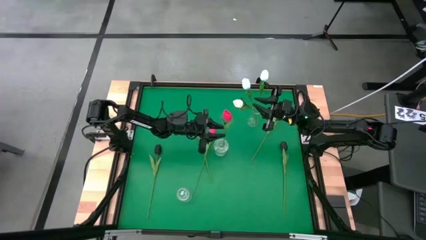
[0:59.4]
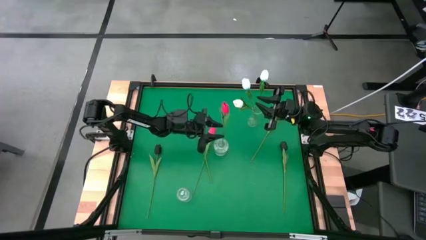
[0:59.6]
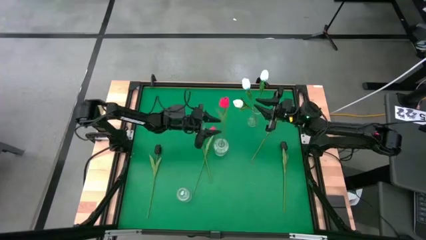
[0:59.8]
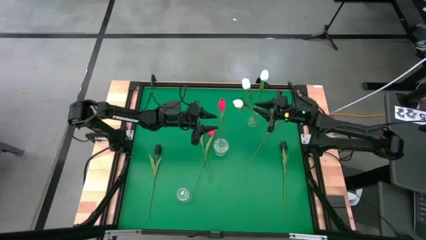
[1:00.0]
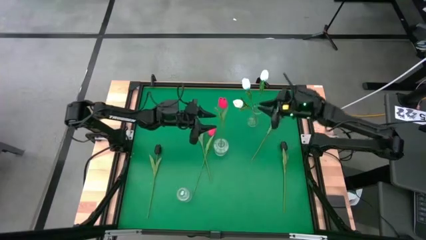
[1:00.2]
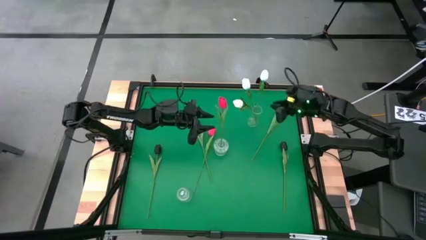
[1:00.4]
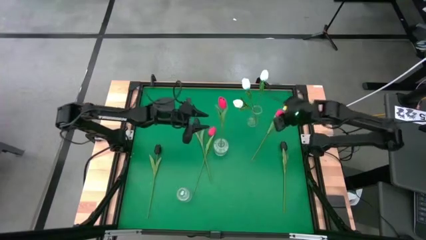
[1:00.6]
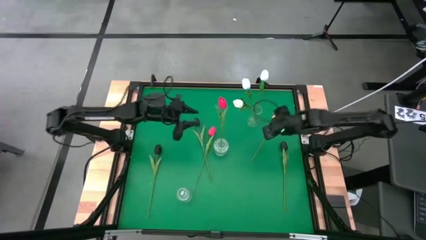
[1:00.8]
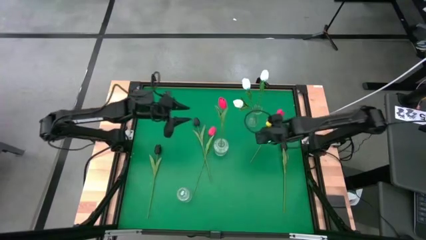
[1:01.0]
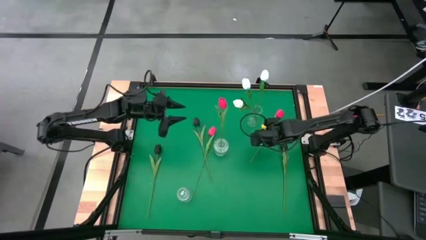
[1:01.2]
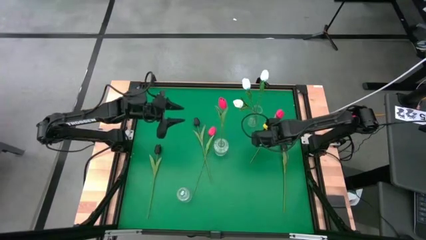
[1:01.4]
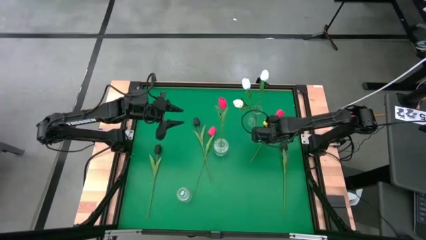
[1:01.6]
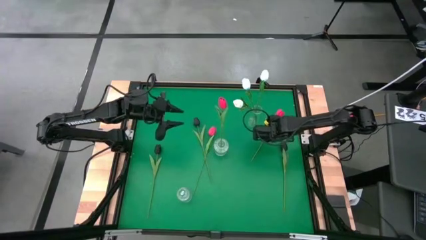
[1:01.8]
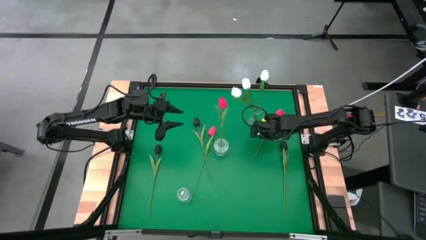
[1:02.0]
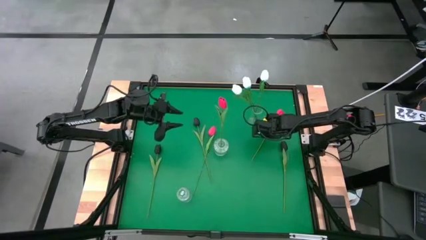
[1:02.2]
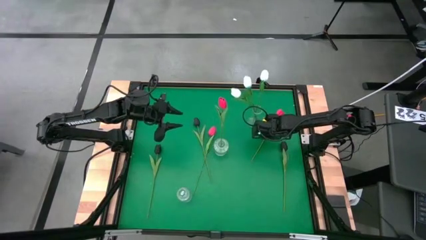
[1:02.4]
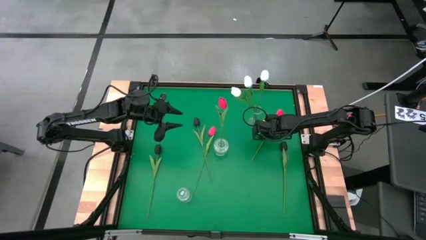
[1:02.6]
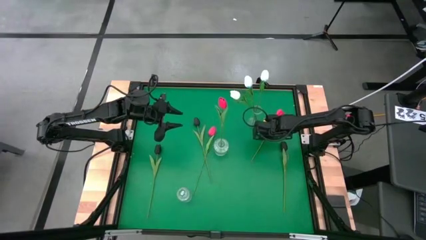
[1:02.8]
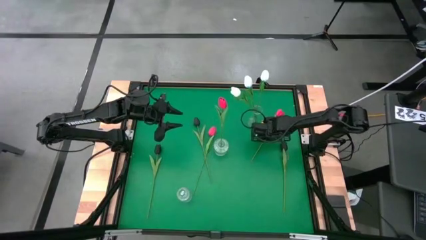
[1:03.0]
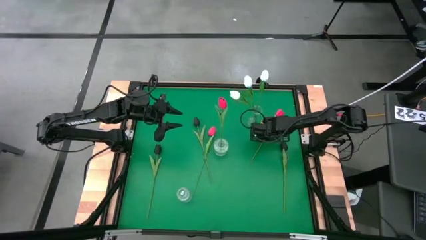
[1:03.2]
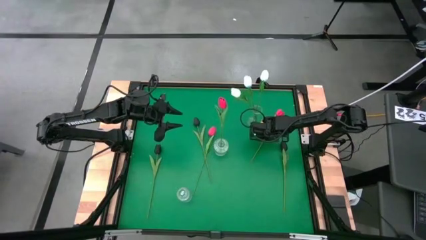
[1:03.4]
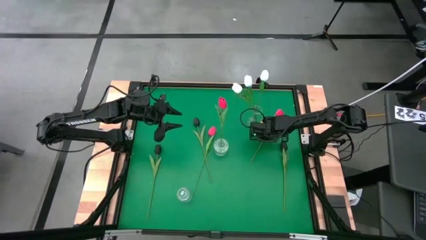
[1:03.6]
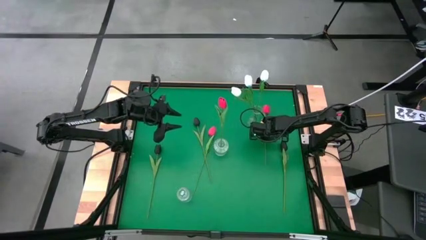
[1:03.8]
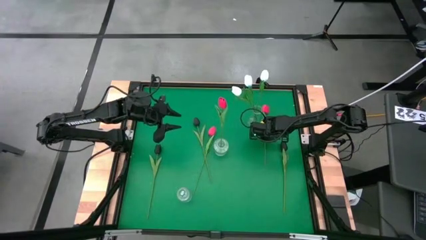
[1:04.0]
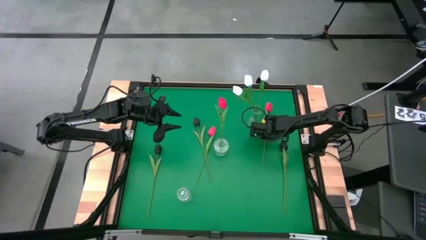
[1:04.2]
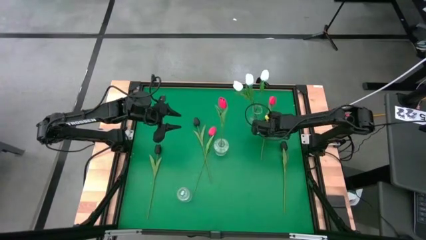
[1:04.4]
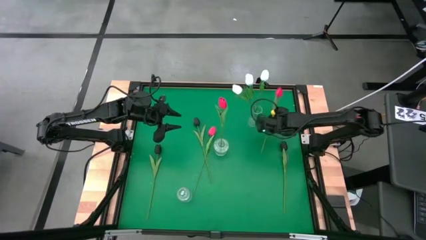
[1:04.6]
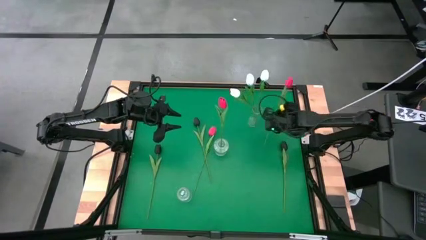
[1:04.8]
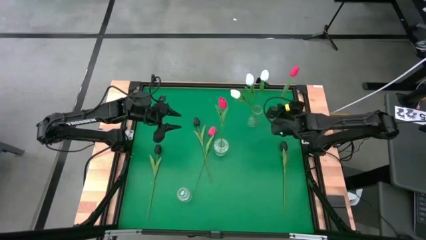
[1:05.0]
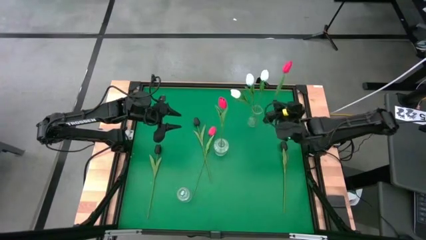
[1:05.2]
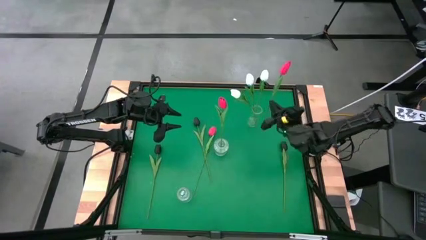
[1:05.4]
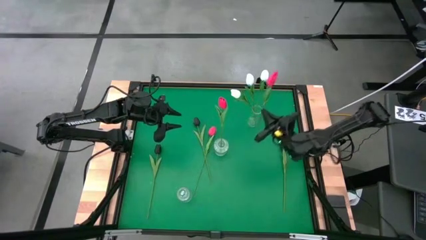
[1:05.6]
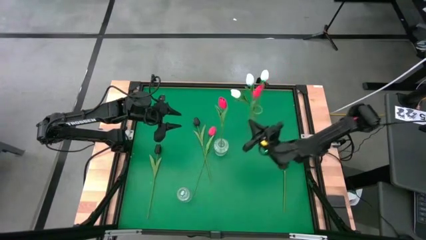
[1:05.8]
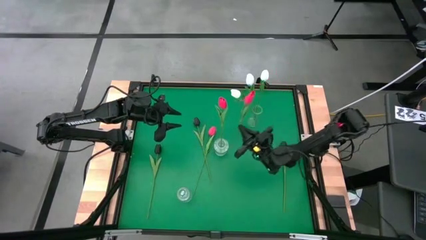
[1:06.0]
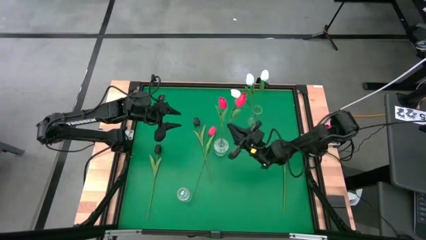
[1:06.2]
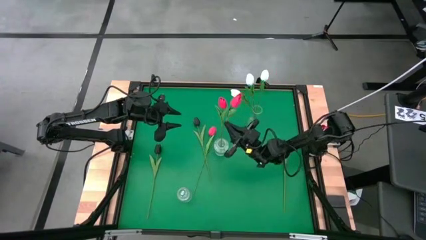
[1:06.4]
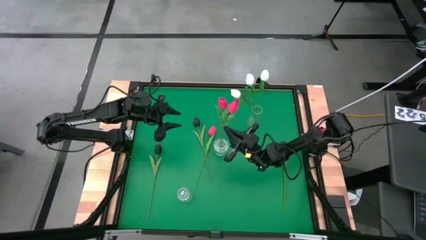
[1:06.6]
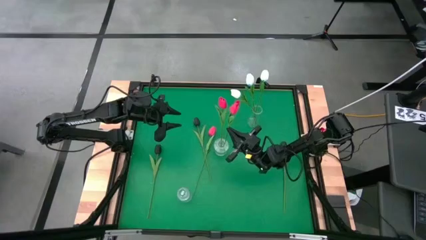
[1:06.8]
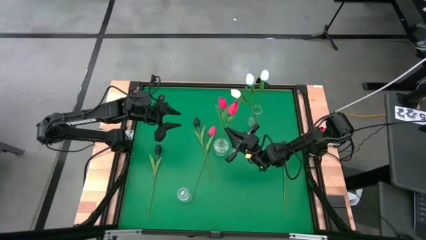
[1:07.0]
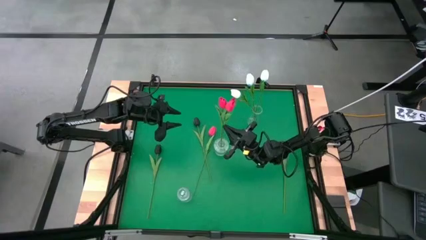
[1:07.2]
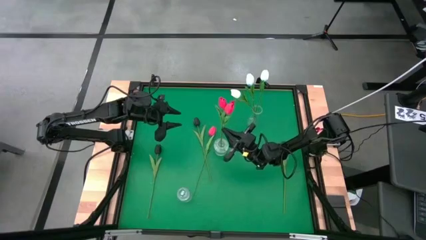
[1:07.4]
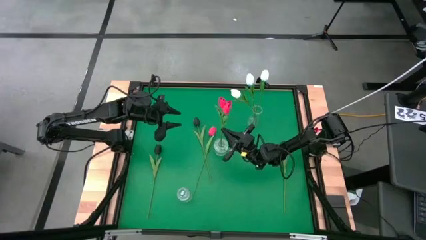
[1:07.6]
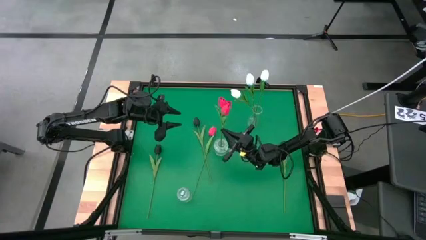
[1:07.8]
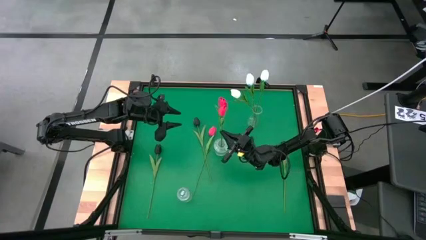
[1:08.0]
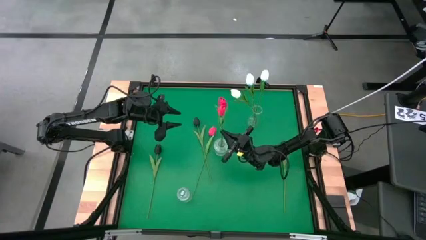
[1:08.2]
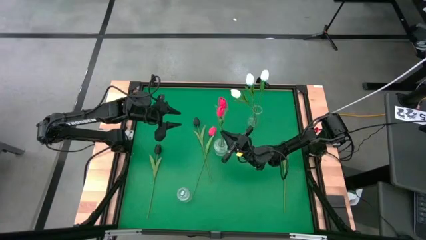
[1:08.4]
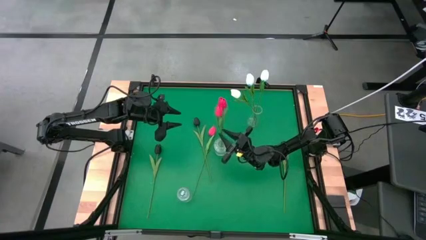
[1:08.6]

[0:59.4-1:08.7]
Task: Sort flowers into vase by color
Put the top right red tulip into the middle transparent flower vase

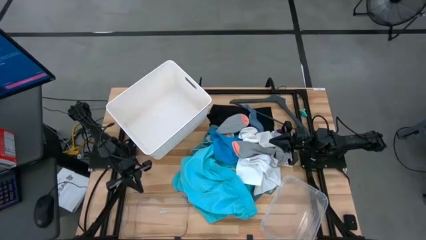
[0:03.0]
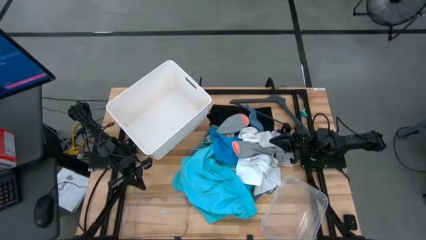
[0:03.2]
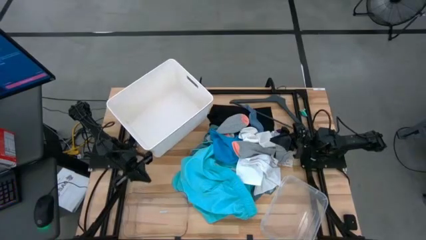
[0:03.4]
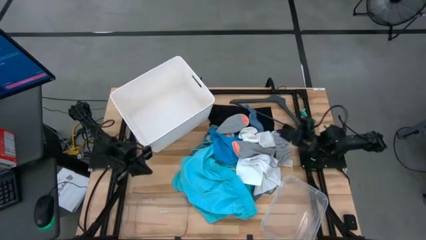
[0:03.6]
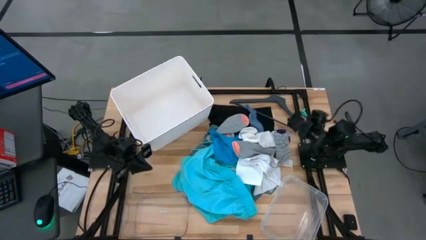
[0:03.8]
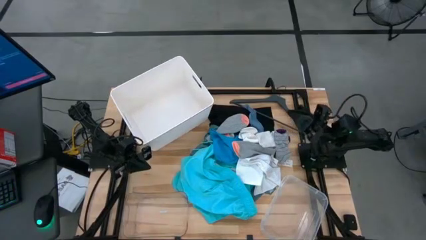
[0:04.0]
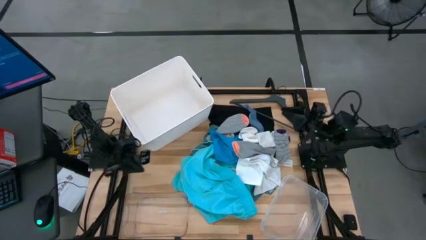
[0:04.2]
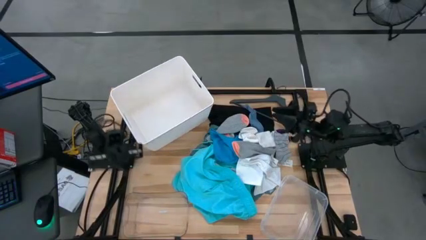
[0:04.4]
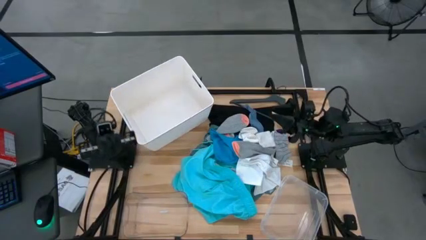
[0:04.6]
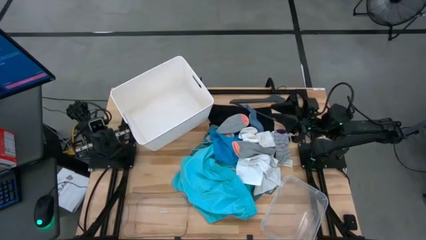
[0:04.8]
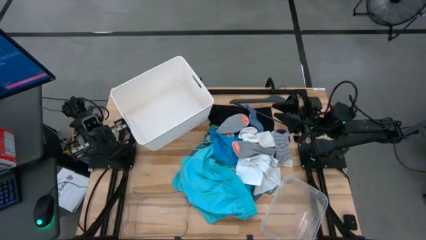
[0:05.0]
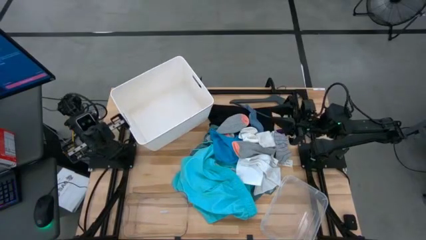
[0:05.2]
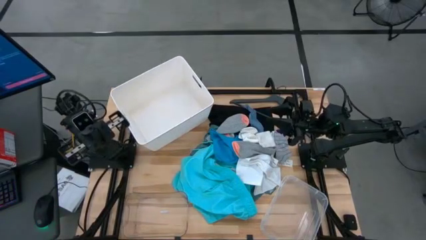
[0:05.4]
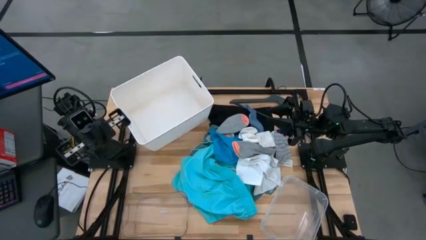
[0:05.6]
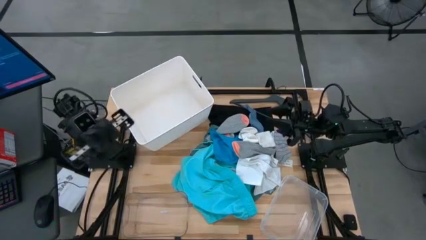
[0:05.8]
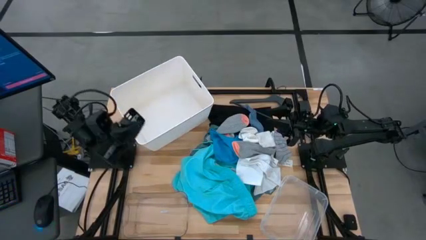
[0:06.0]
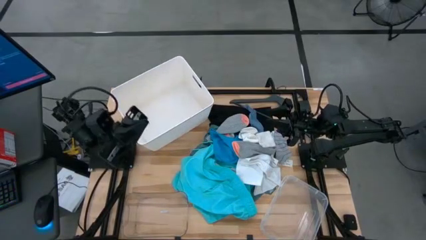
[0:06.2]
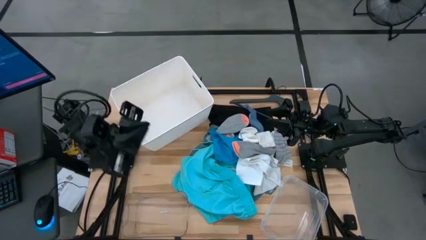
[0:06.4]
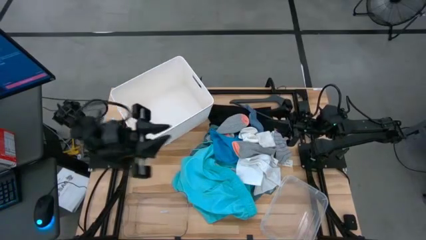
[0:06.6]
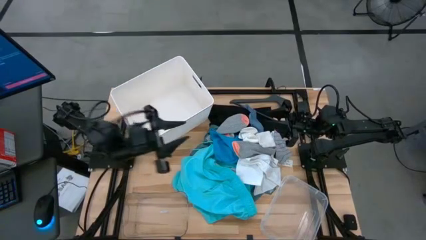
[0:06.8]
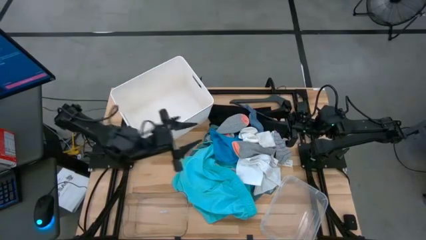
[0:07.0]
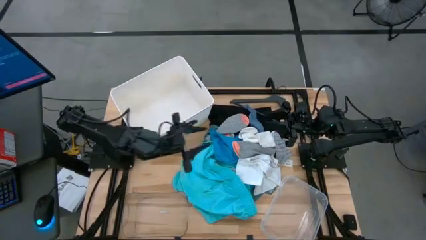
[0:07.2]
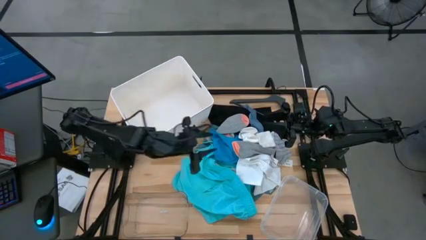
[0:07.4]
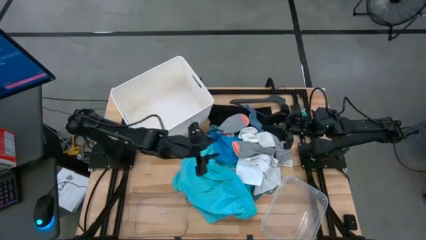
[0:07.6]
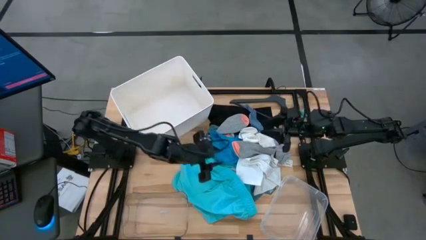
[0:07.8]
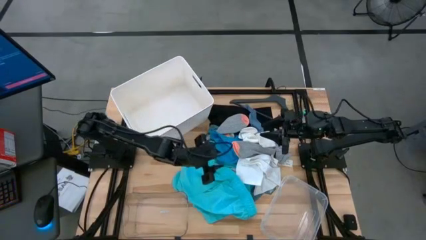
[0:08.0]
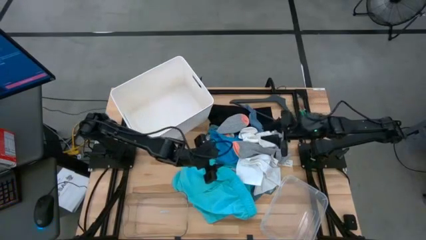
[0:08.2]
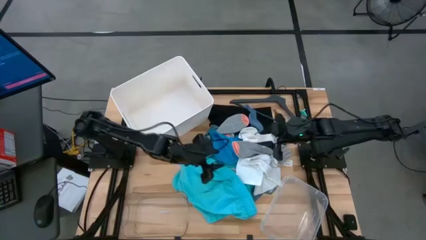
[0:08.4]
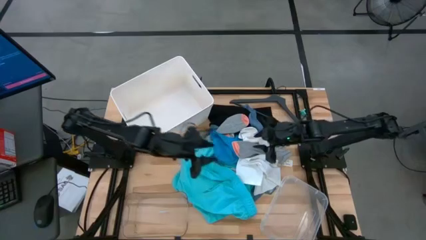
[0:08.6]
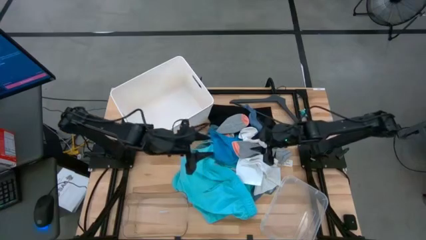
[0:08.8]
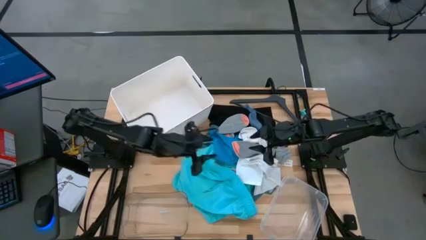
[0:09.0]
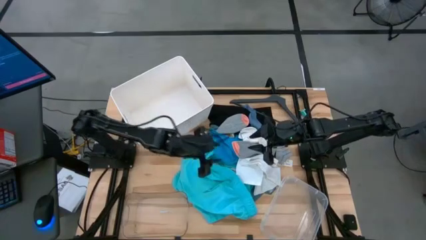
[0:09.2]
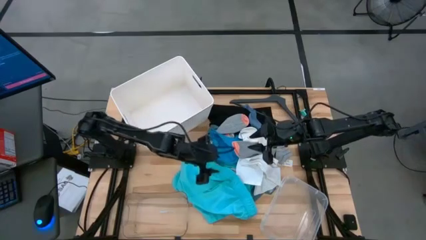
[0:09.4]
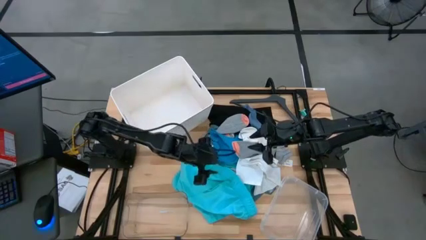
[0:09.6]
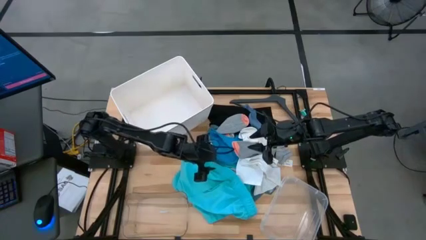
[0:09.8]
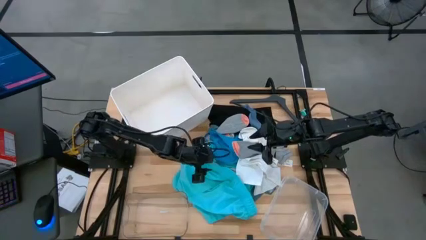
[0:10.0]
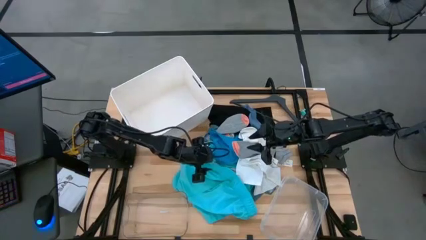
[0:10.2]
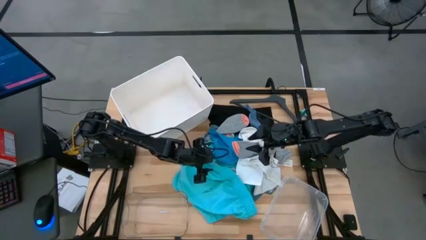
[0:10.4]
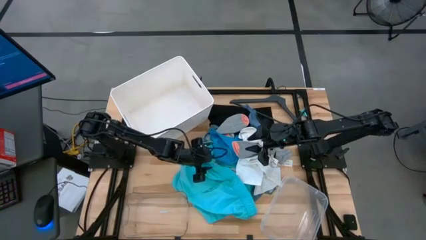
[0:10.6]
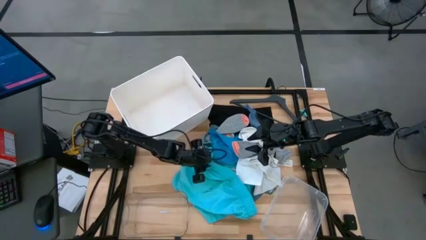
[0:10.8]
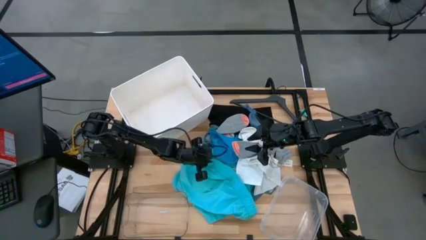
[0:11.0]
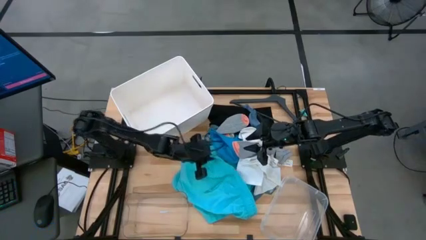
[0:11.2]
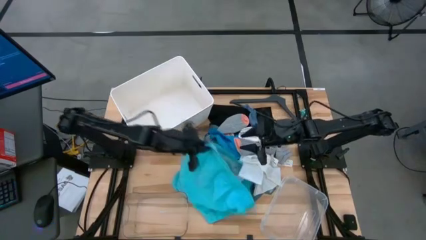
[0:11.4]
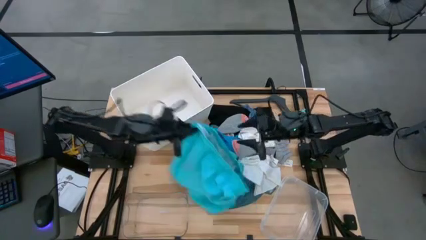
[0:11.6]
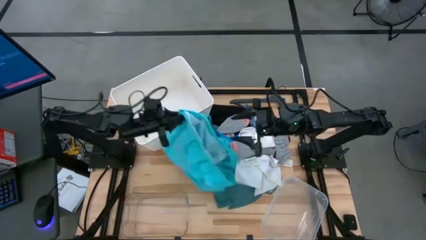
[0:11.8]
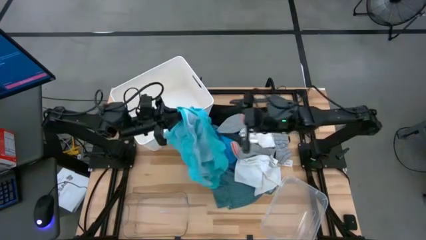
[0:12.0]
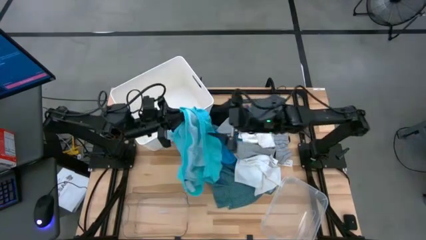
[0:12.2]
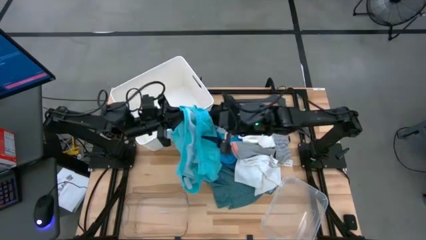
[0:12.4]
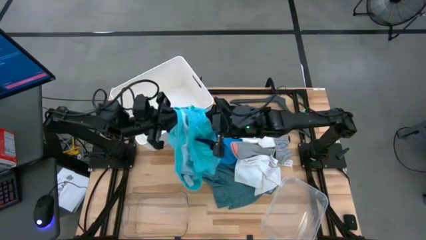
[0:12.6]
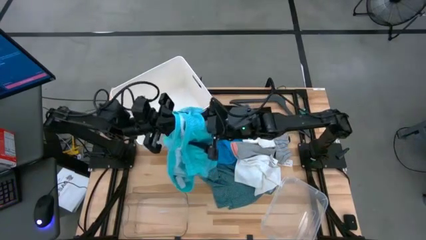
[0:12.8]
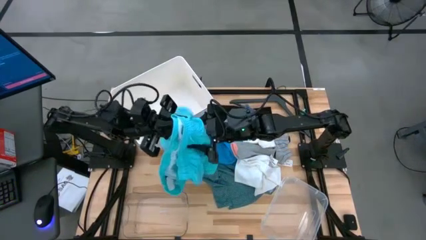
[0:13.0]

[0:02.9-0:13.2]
Task: Pick & Place Cloths
Put the green shorts into the right transparent bin
